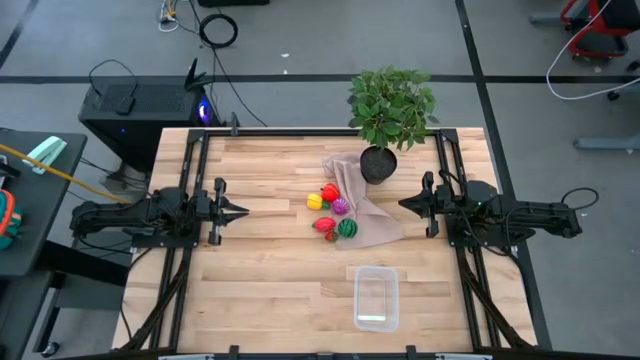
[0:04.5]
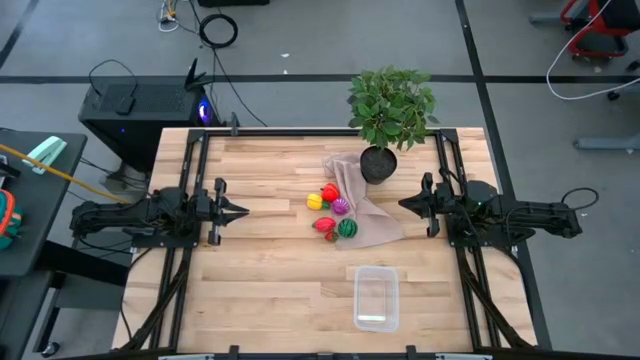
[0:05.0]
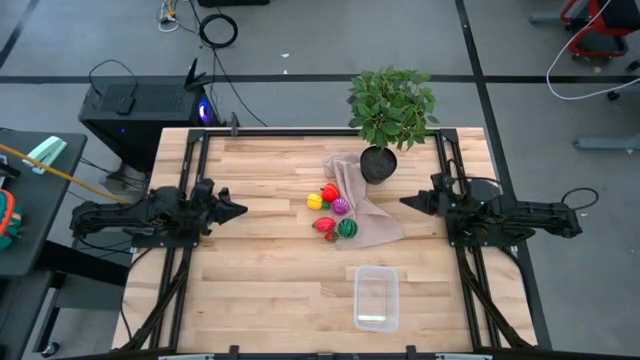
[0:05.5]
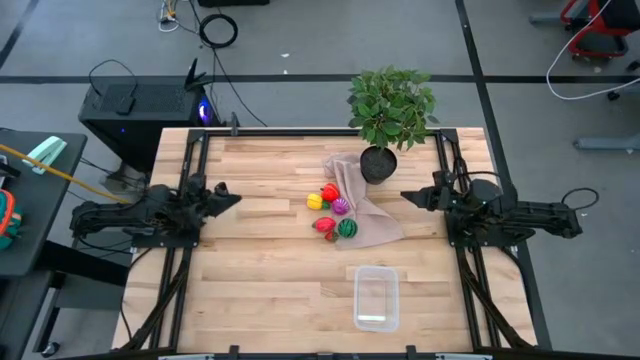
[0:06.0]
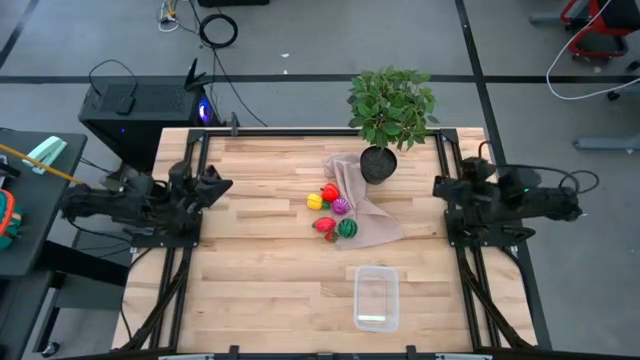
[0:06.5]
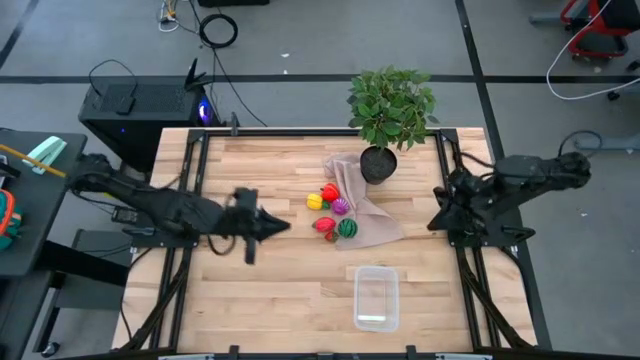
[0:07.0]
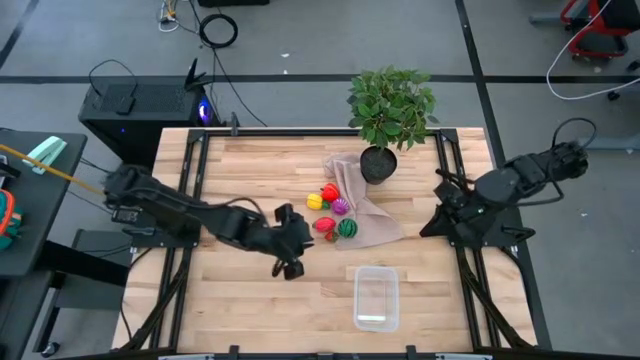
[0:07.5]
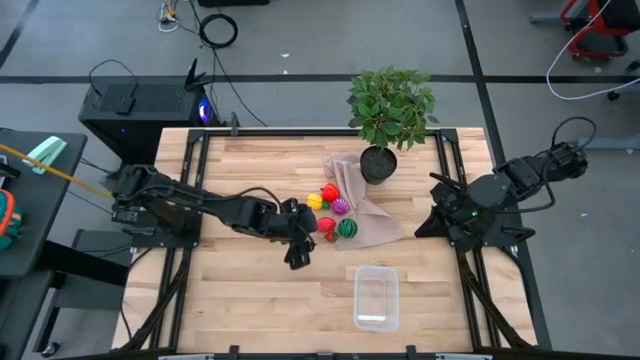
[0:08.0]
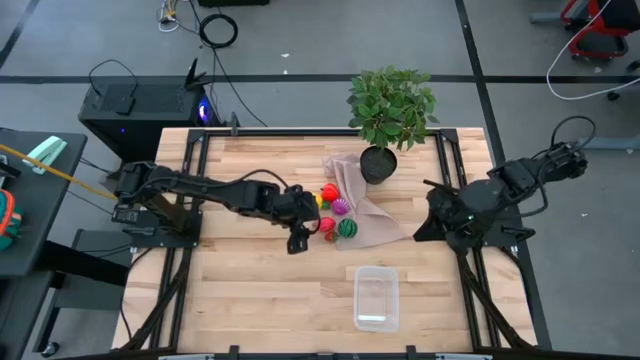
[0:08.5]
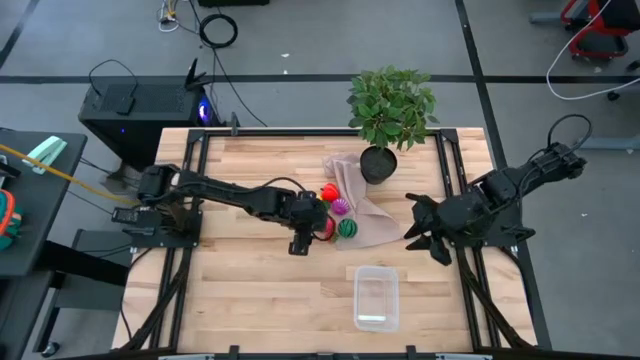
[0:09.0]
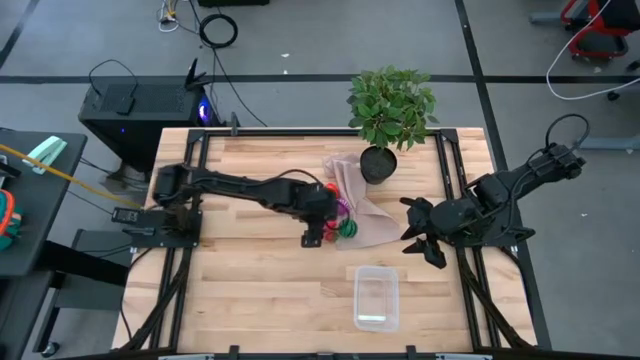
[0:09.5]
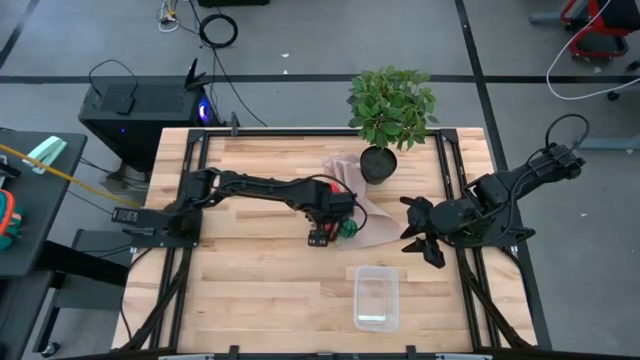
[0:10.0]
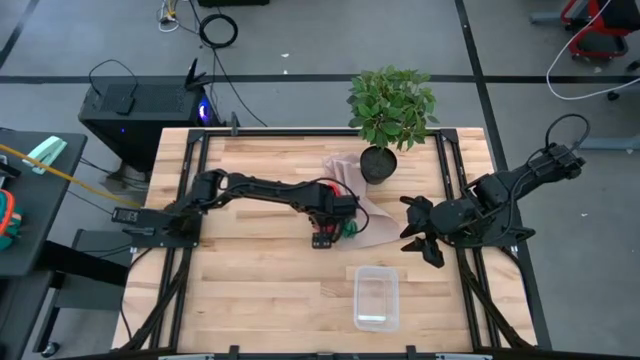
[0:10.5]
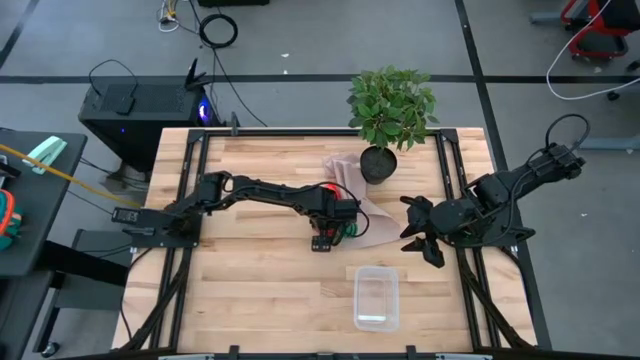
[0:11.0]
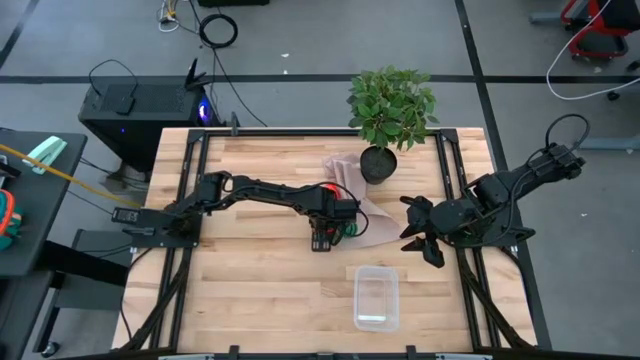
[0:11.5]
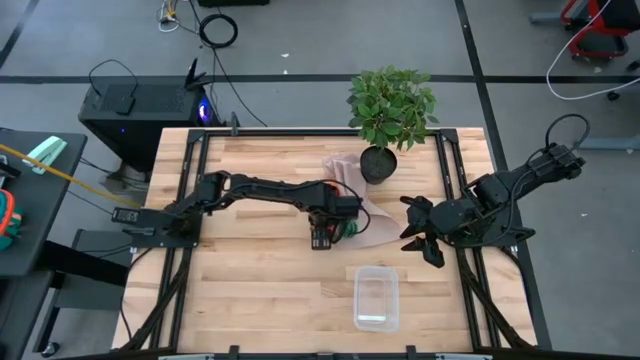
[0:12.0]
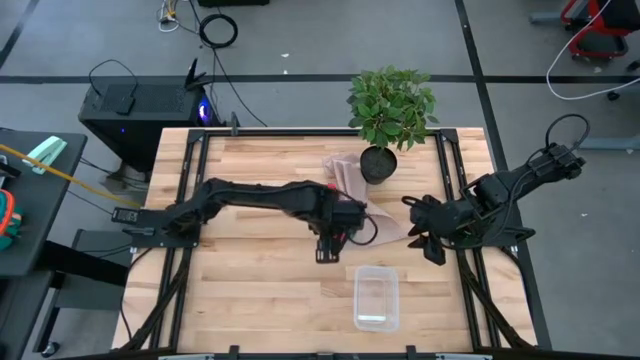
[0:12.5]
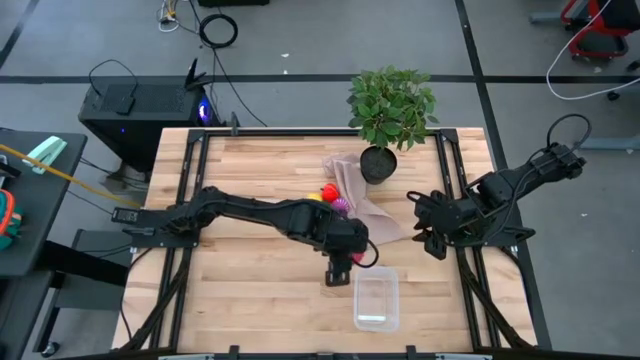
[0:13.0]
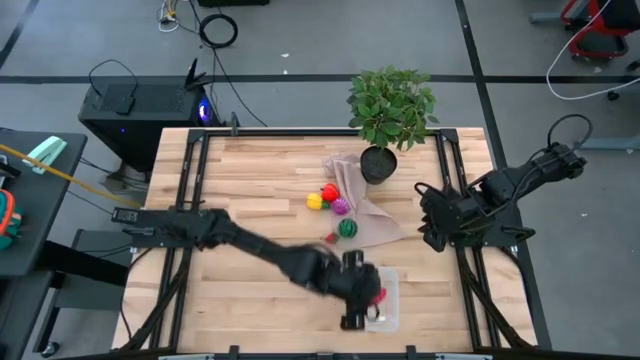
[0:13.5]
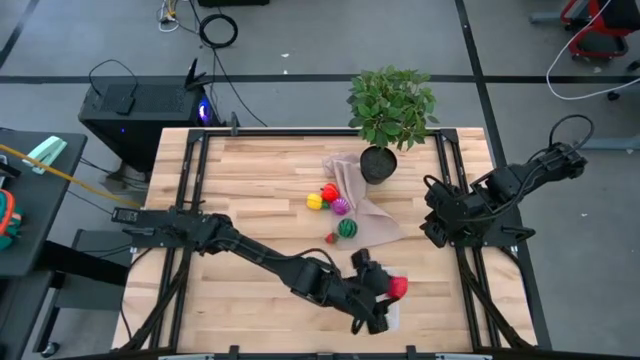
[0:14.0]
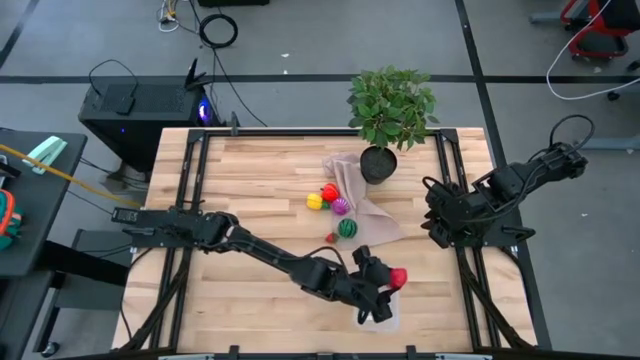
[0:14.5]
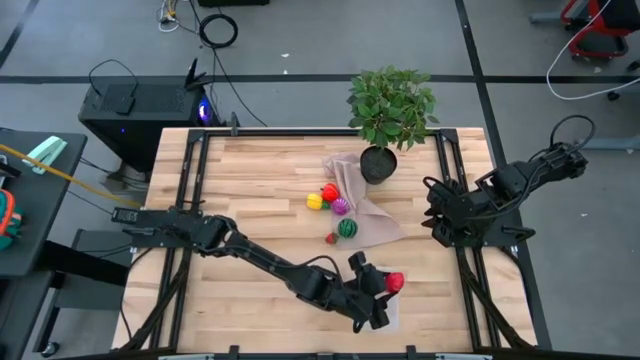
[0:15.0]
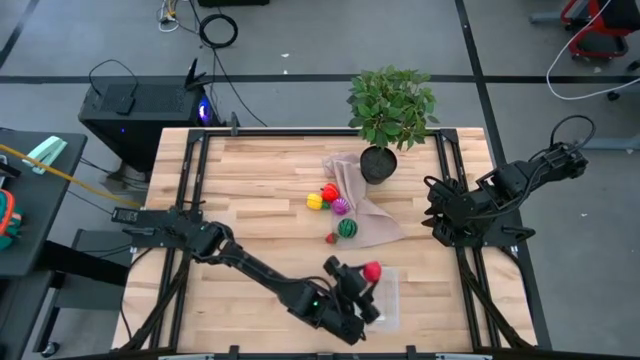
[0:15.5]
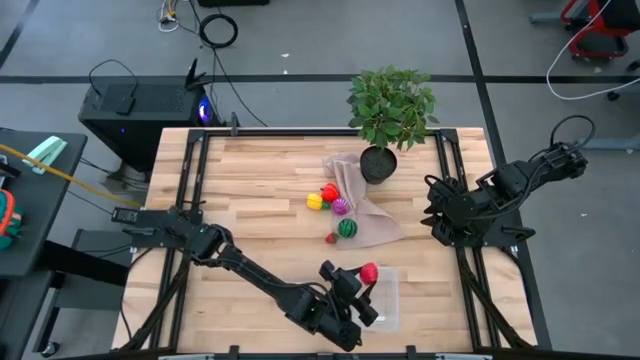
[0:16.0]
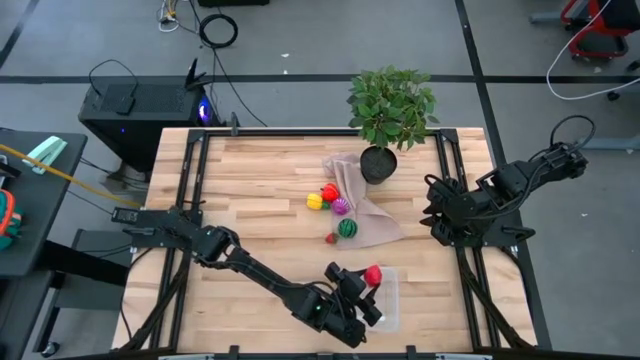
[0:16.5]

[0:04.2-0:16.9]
Task: Pick and placing Produce into tupperware
Put the red dragon fruit into the transparent bin

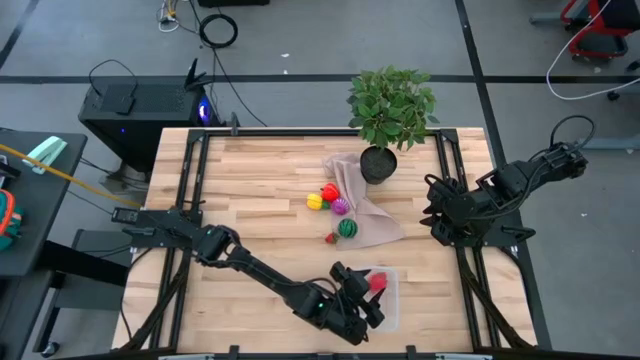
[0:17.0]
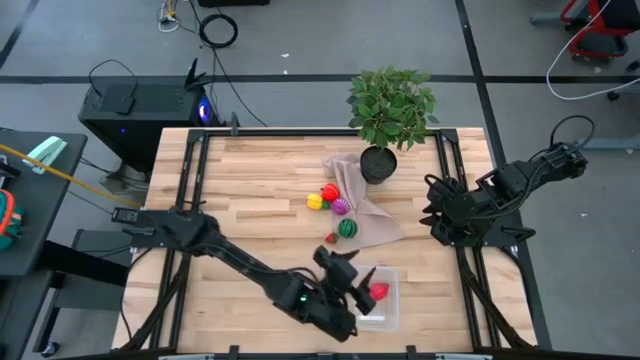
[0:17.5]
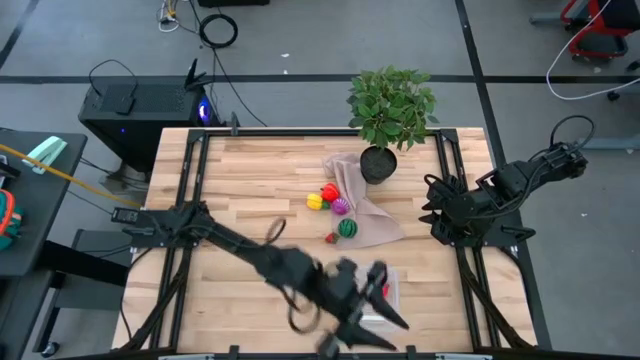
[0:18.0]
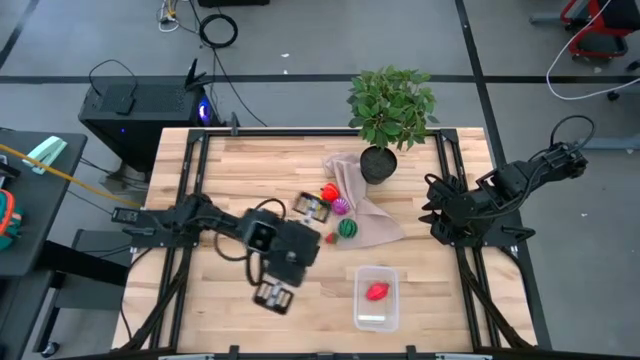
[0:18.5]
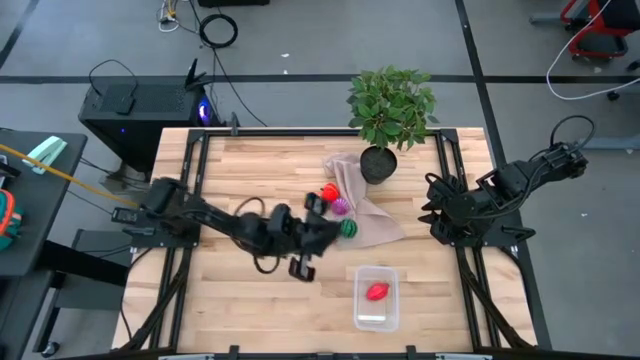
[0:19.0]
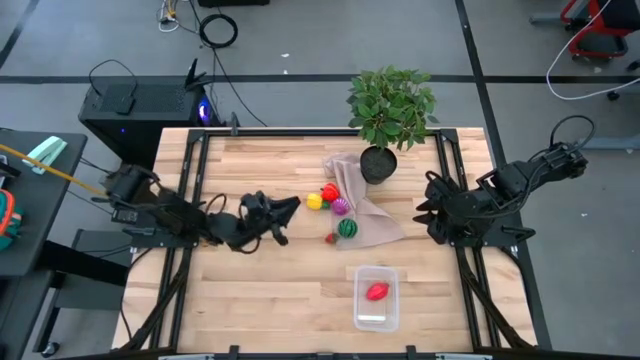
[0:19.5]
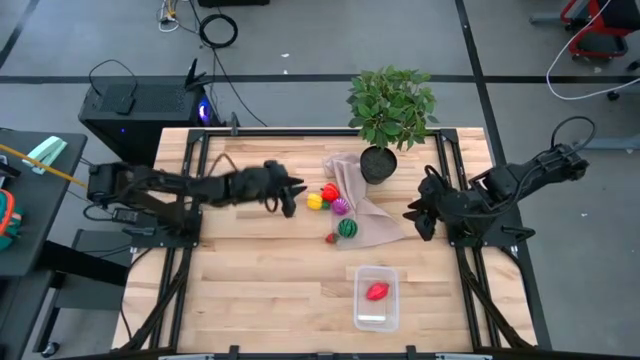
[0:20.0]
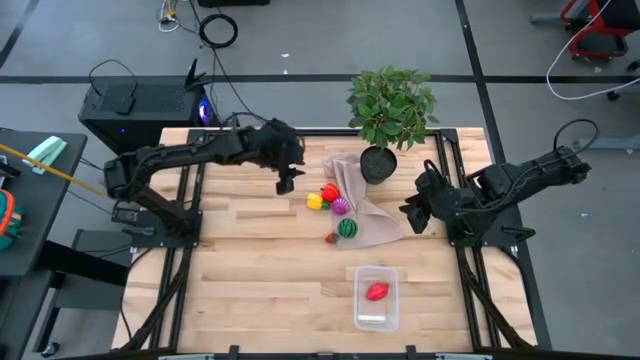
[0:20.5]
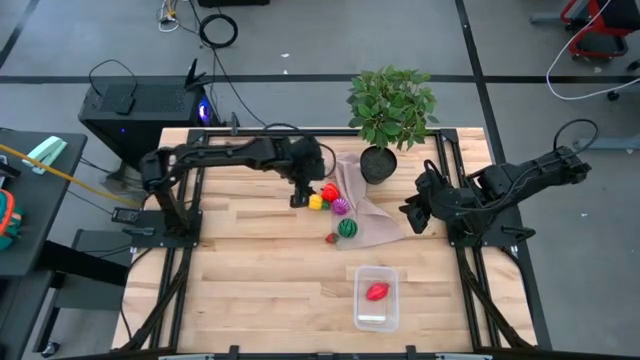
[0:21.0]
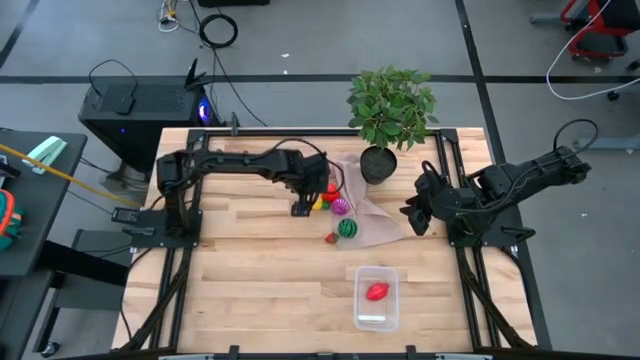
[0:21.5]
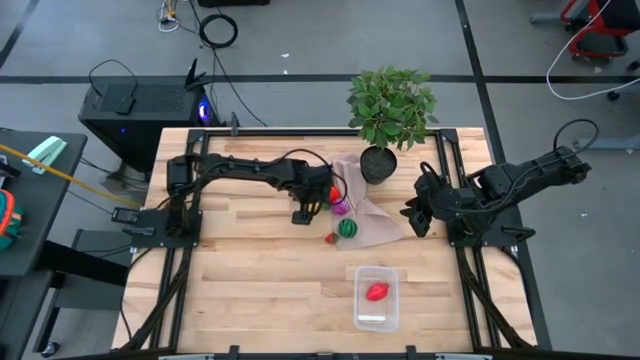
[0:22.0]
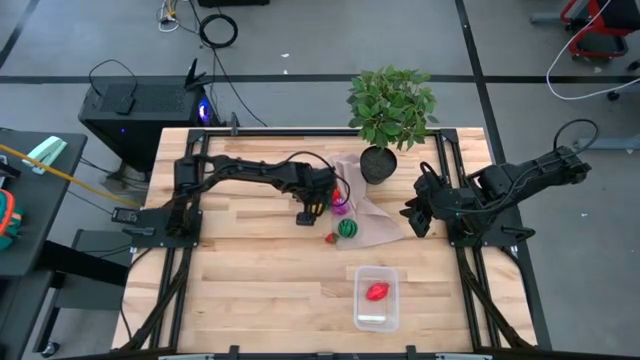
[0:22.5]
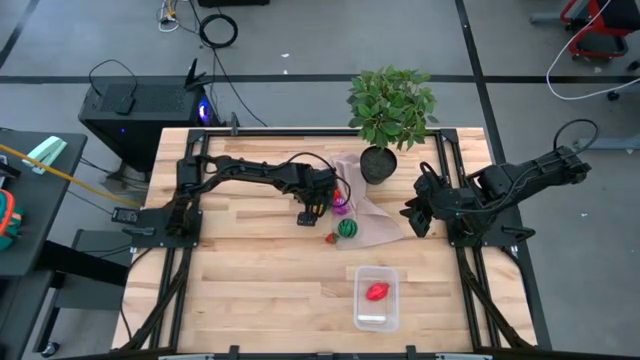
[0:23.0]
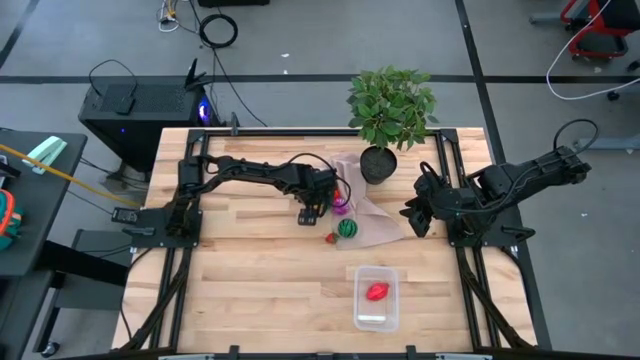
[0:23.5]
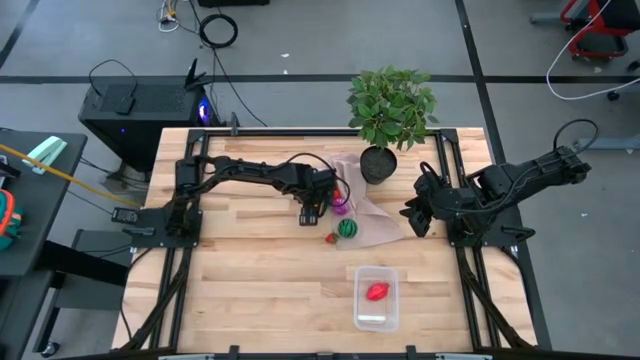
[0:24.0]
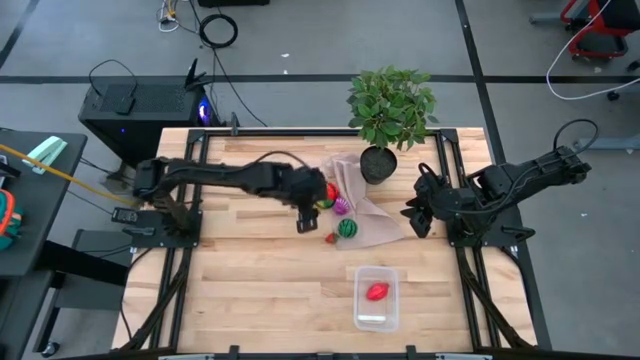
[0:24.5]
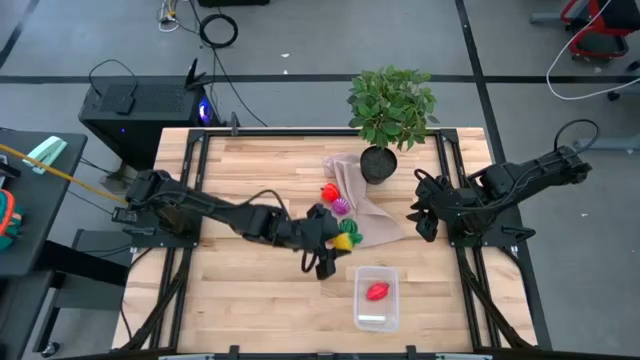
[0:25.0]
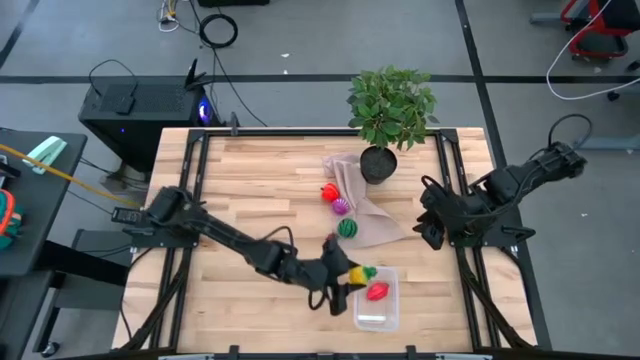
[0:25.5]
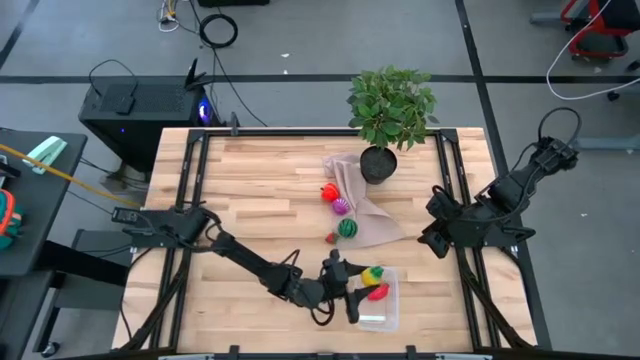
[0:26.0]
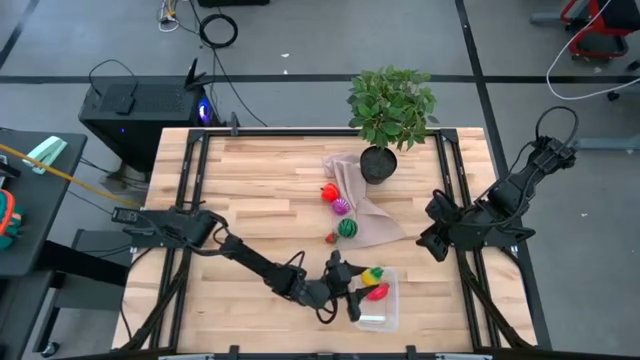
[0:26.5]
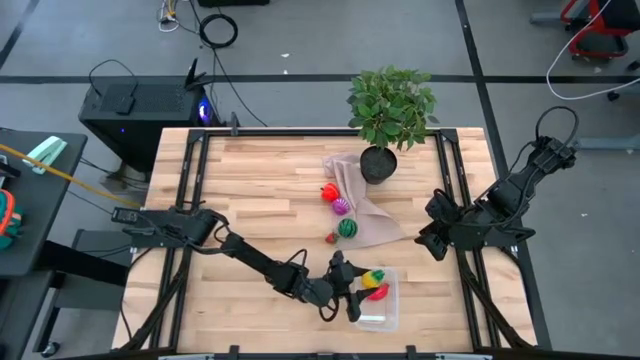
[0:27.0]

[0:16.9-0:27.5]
Put the yellow pineapple into the transparent bin
